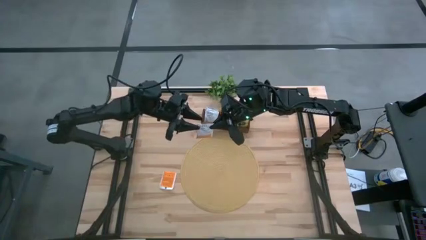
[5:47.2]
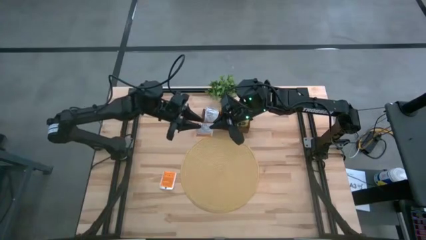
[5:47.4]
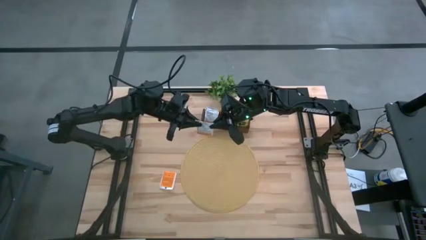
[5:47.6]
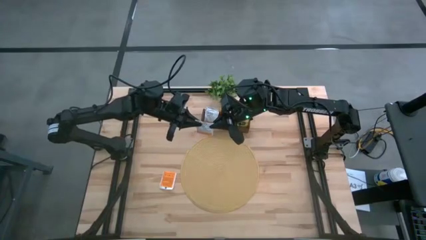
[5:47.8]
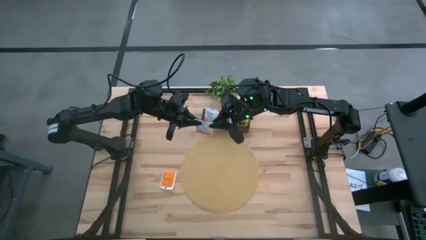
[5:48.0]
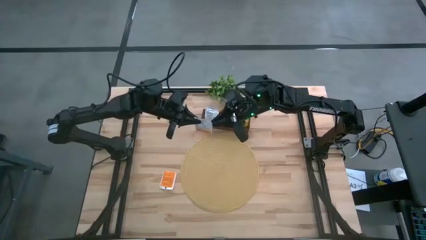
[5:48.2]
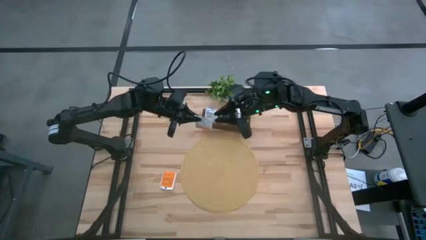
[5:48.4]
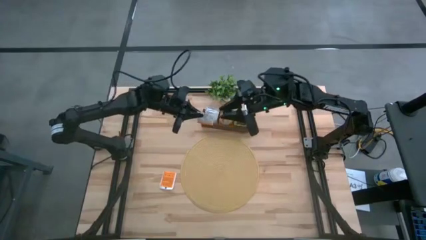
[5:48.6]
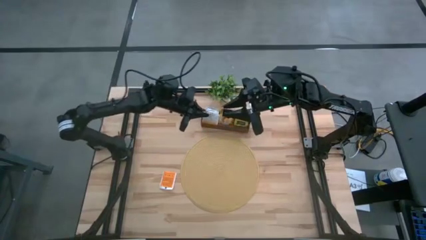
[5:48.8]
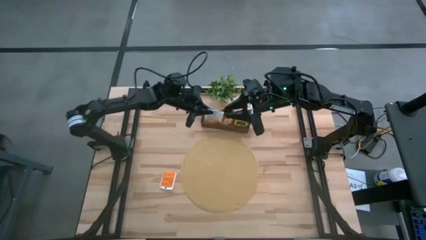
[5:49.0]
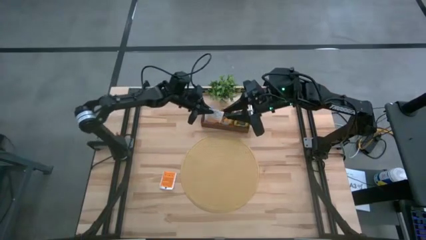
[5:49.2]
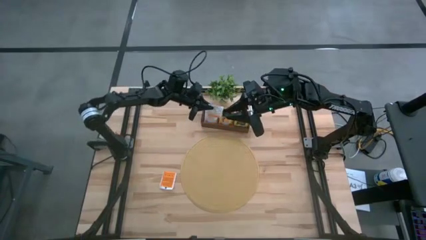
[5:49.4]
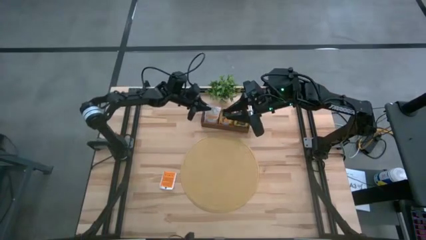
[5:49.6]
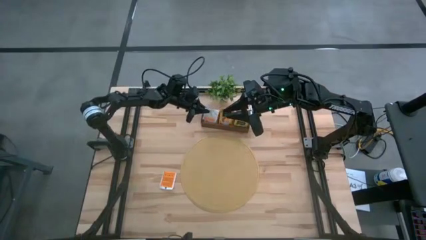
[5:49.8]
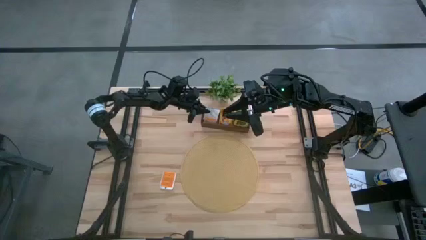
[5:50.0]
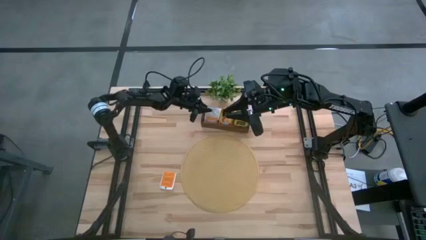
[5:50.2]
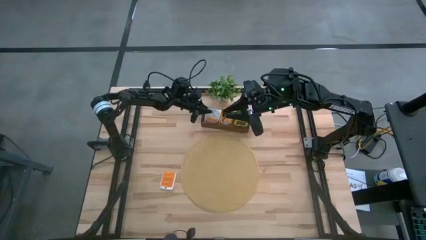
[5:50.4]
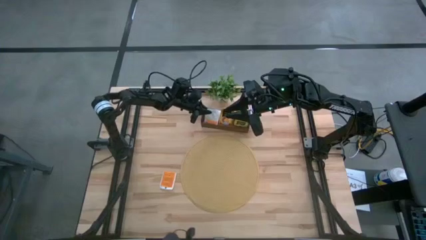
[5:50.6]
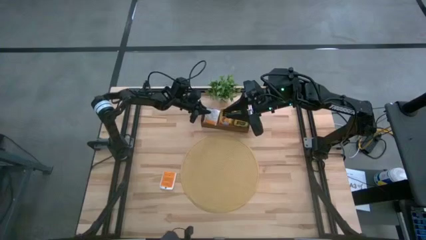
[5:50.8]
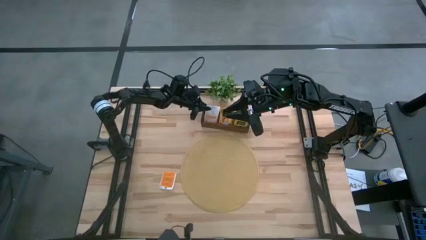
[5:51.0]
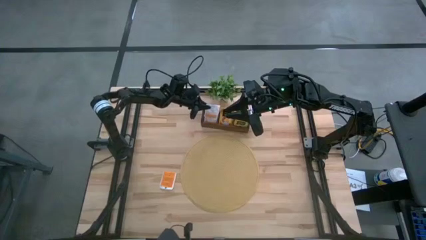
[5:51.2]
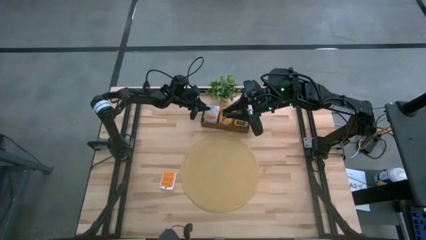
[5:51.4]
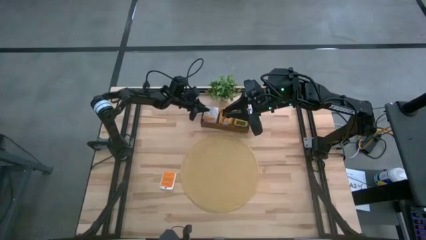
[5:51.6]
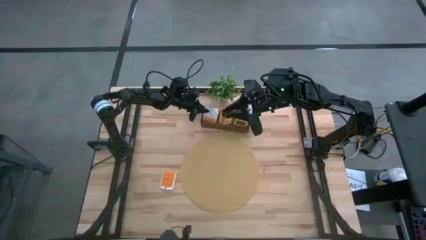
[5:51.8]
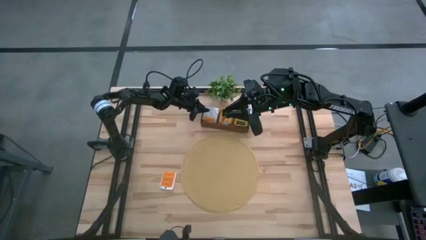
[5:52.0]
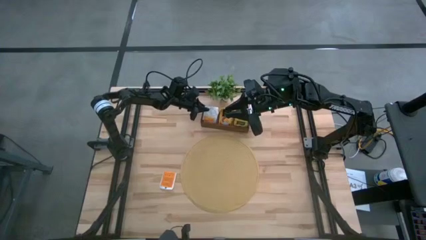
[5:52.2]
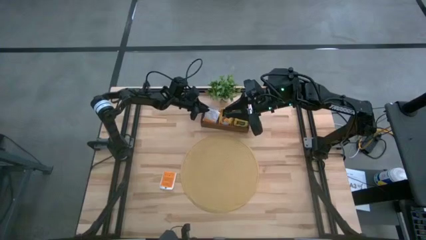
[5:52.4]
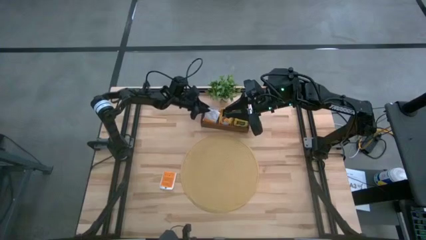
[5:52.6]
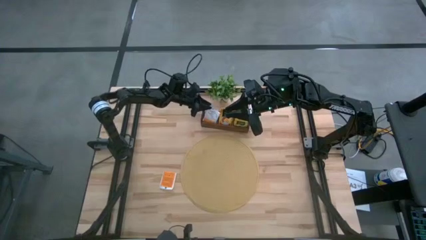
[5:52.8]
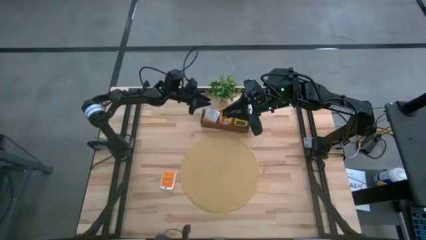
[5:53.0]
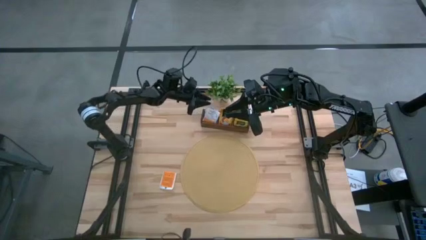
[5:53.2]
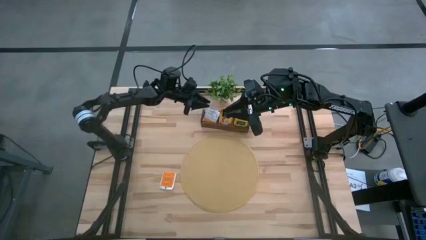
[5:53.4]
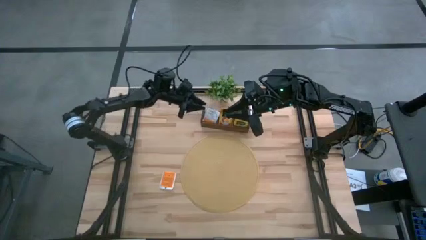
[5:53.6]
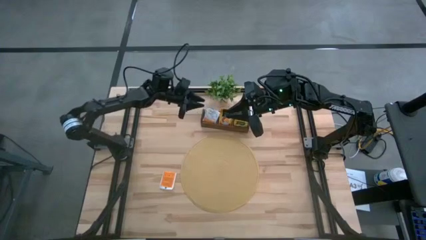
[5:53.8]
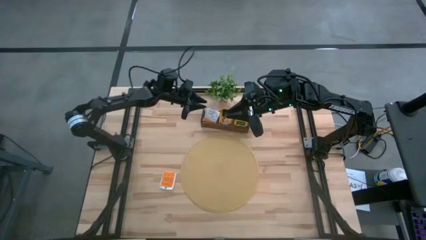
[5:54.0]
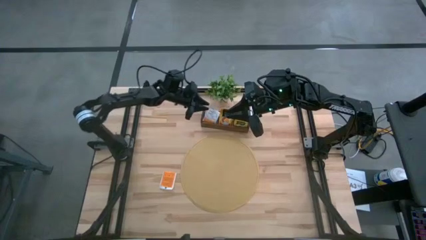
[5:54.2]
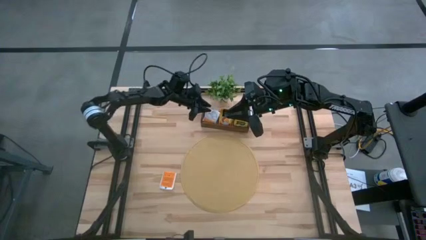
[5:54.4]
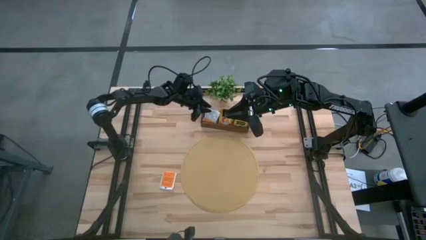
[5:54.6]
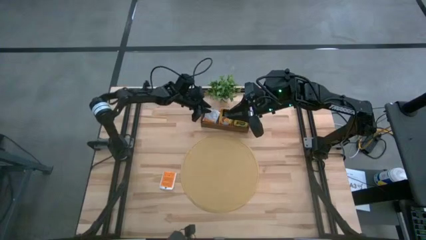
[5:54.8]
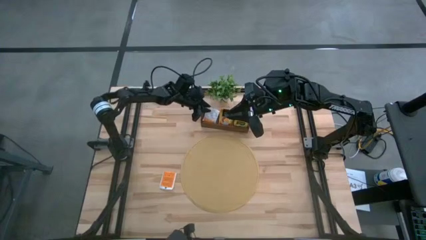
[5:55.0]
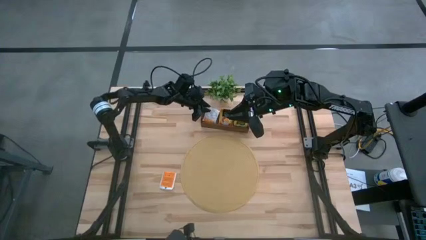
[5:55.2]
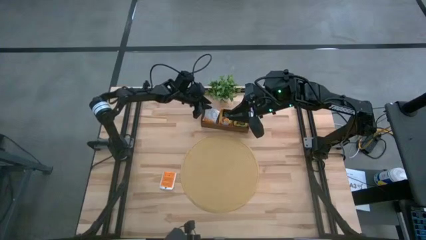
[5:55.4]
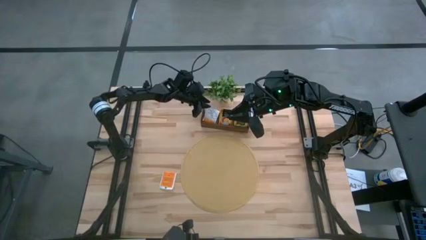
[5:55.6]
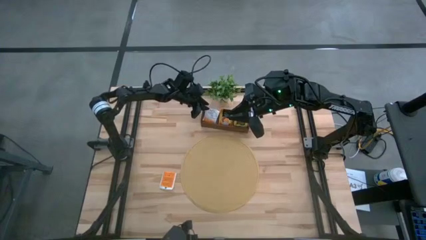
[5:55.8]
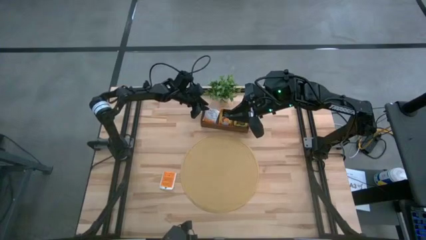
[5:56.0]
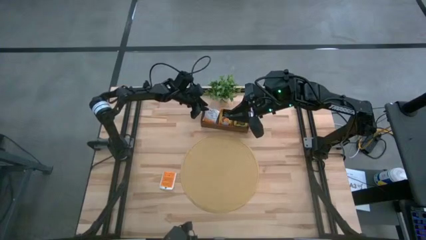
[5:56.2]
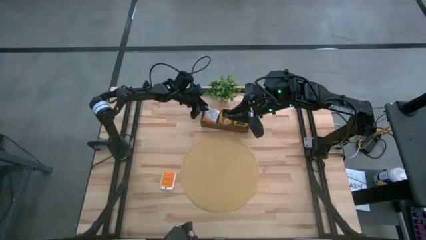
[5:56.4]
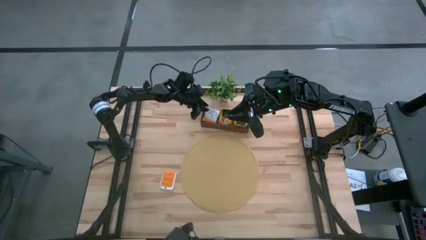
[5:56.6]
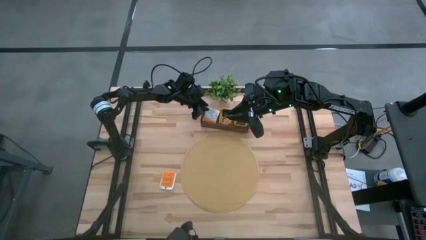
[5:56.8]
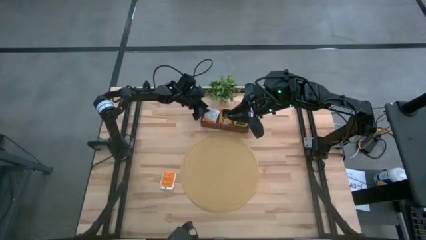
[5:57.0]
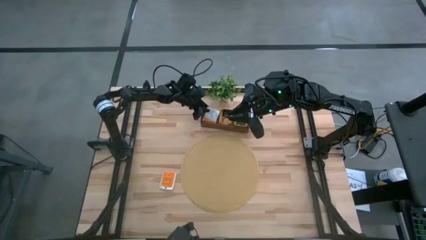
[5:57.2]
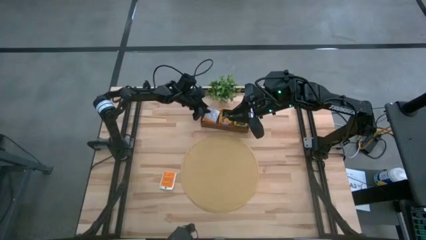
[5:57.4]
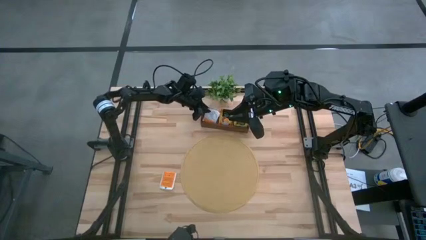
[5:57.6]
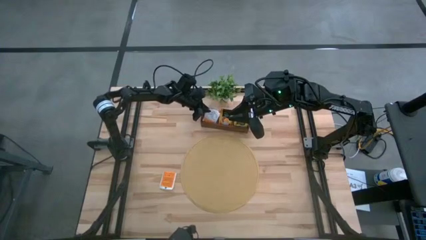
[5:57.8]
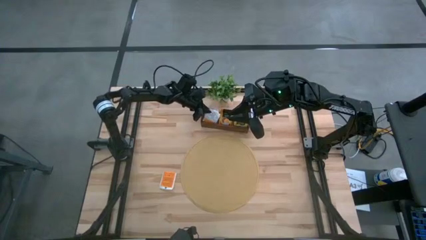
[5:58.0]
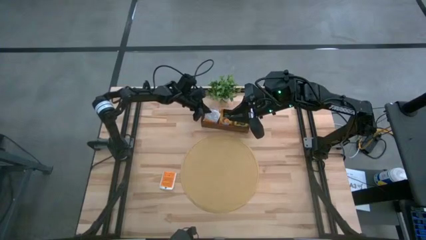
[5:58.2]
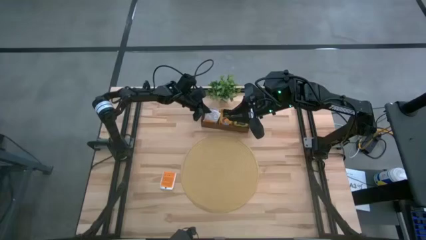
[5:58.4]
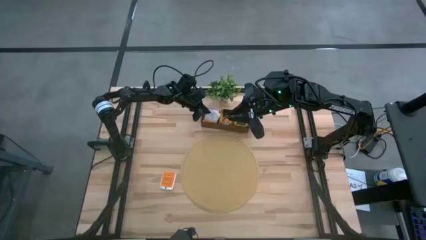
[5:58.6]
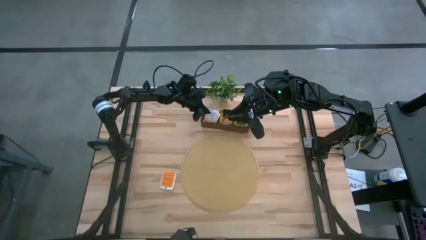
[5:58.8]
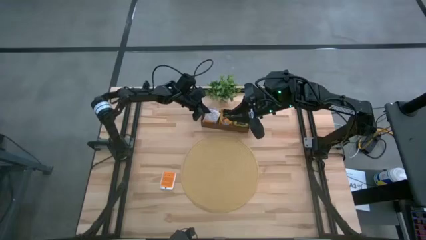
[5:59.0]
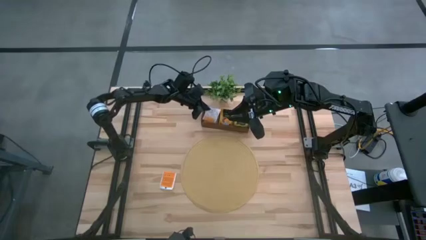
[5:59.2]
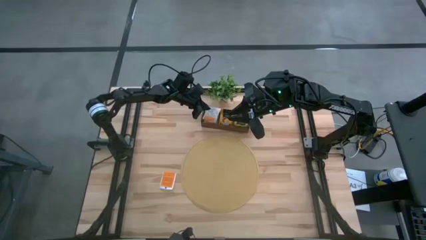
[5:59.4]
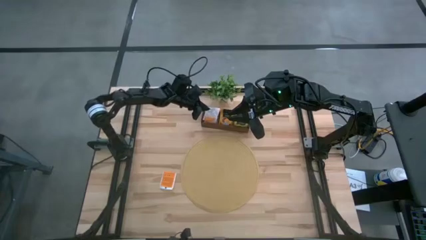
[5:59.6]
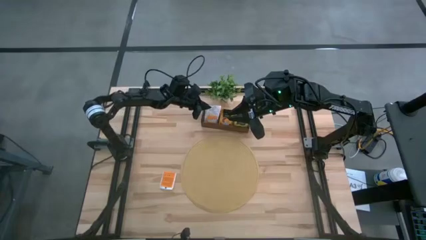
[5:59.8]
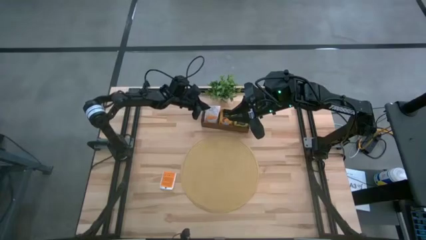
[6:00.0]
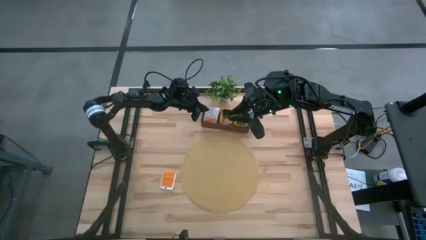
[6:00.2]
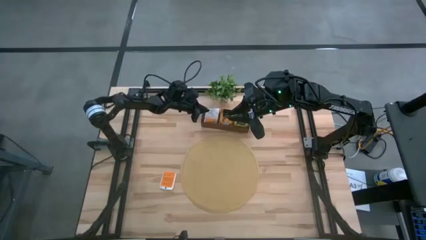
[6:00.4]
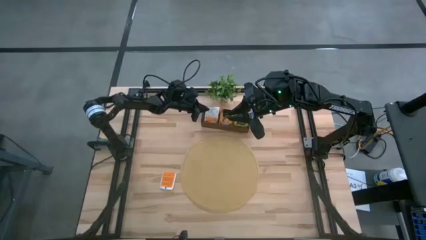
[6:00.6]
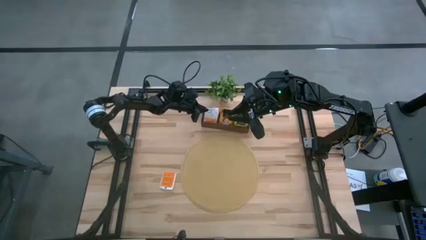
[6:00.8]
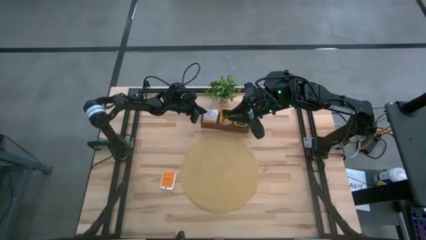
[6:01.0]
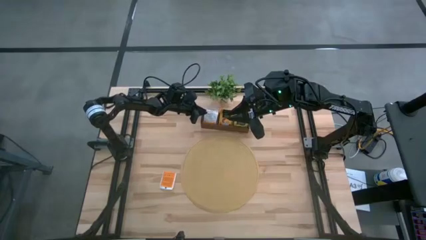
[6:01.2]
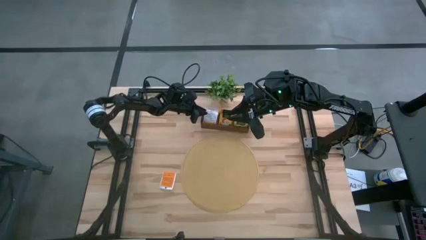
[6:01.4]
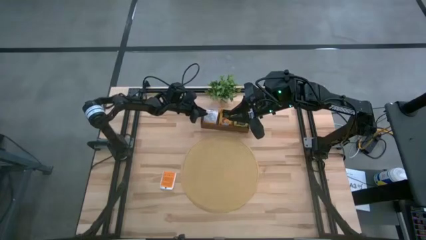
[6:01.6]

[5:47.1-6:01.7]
Task: Pick & Place Tea
Put the white tea bag into the left section of the wooden organizer

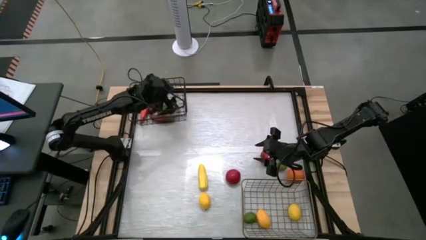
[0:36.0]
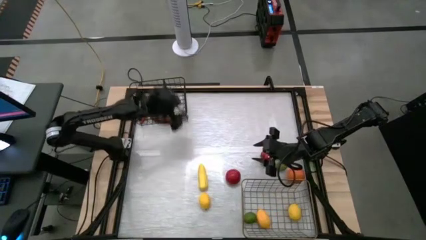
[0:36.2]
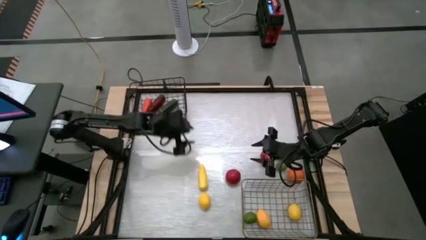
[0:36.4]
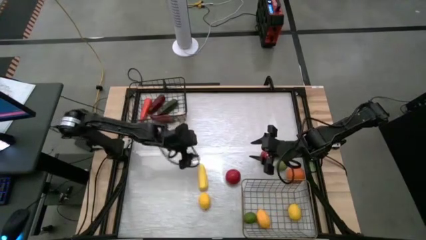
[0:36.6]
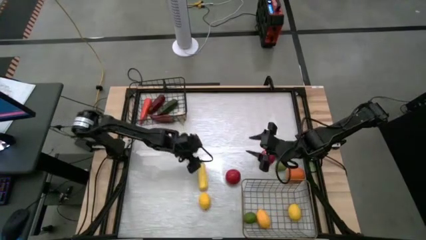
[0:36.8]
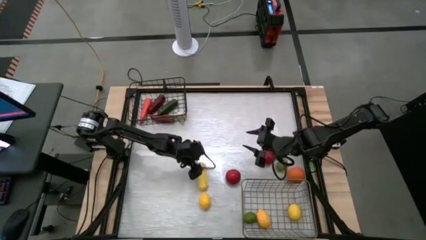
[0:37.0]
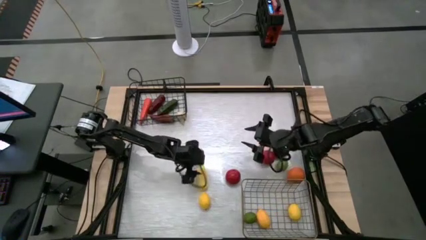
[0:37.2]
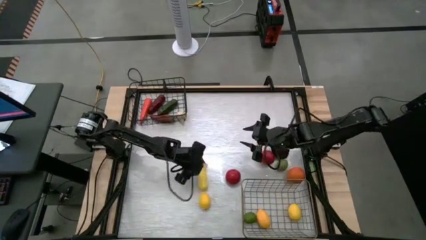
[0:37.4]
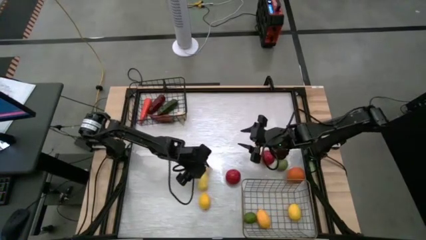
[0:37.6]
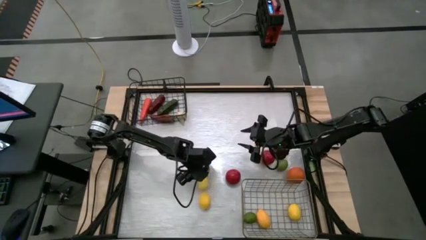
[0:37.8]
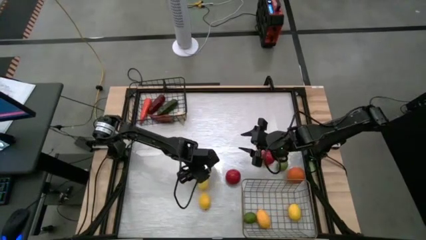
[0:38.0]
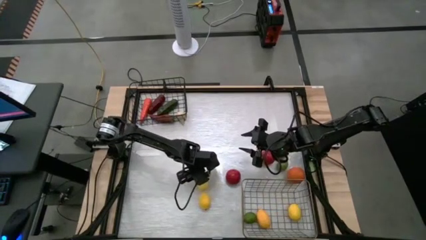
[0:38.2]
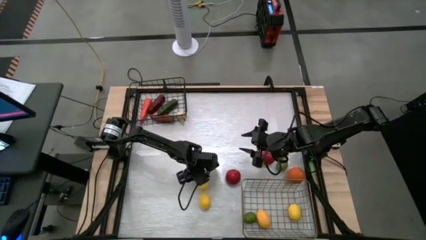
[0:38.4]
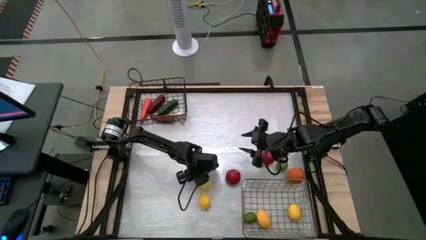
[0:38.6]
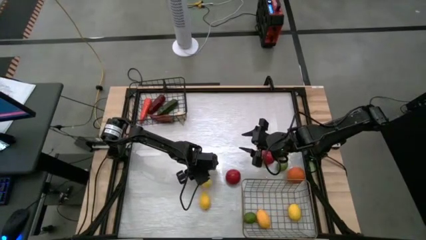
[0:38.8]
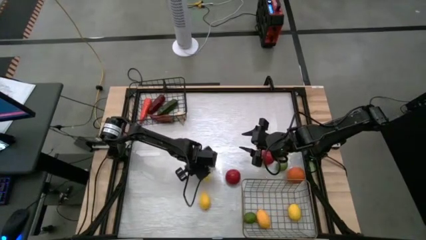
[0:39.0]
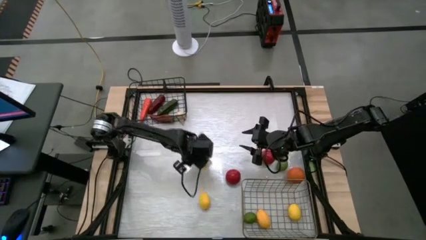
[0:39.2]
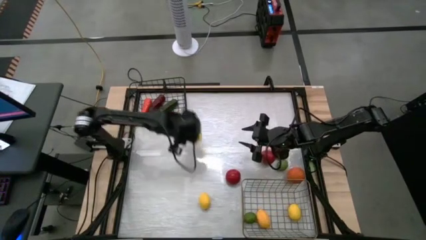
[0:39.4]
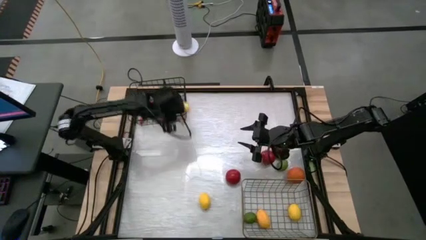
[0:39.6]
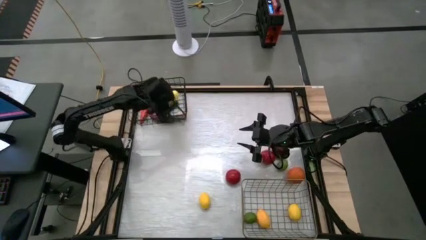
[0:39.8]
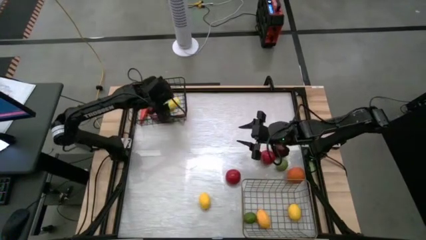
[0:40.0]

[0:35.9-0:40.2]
Task: Sort produce into baskets
Put the corn into the black wire basket
